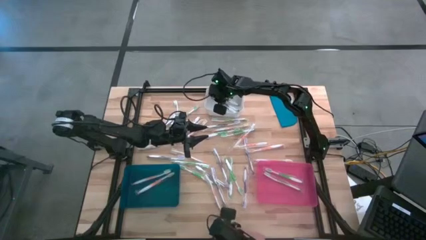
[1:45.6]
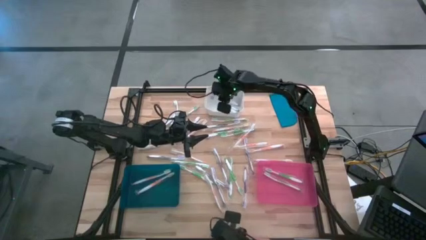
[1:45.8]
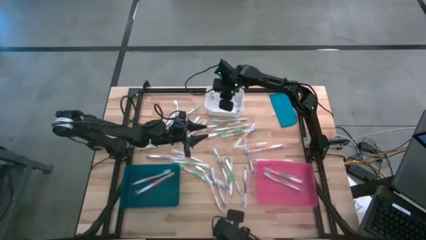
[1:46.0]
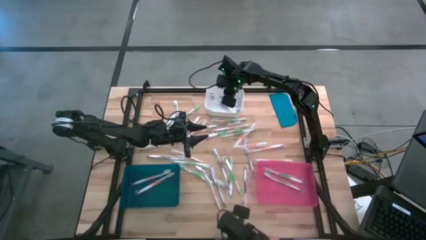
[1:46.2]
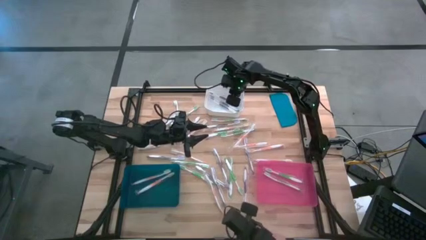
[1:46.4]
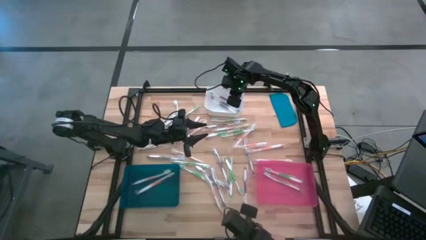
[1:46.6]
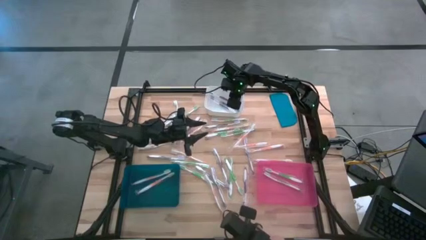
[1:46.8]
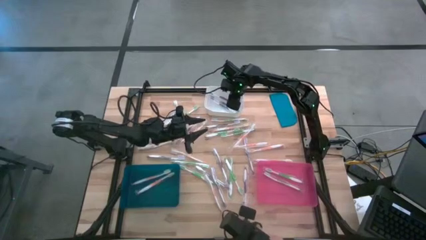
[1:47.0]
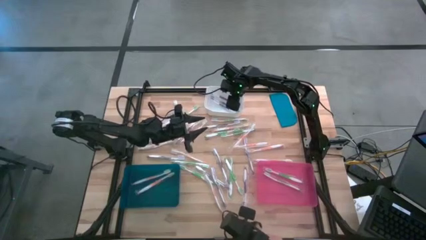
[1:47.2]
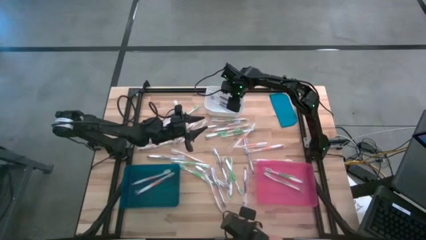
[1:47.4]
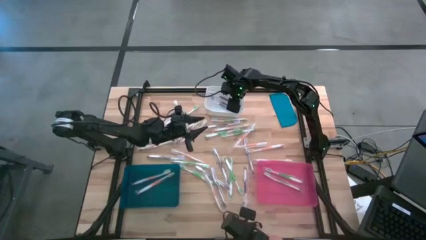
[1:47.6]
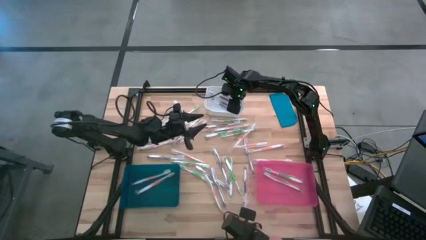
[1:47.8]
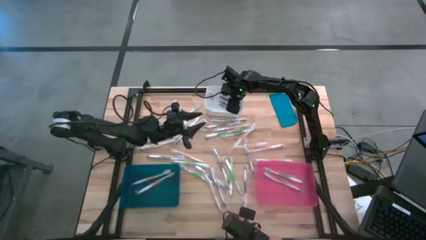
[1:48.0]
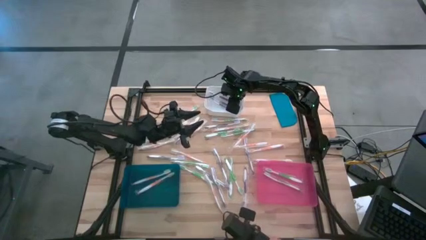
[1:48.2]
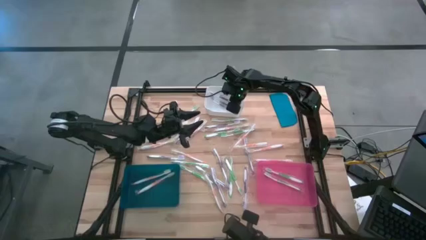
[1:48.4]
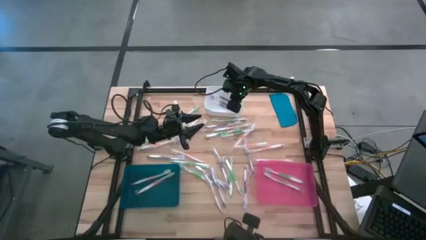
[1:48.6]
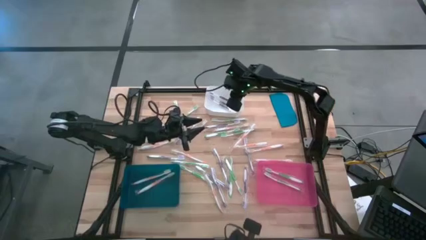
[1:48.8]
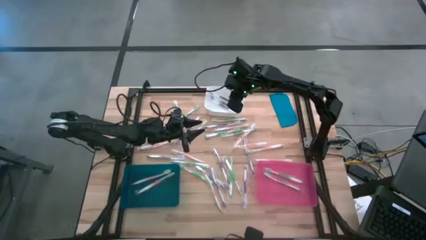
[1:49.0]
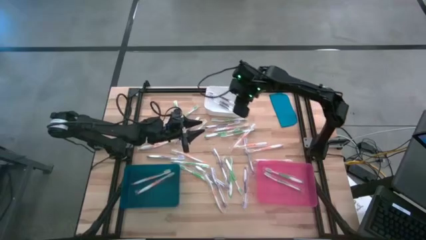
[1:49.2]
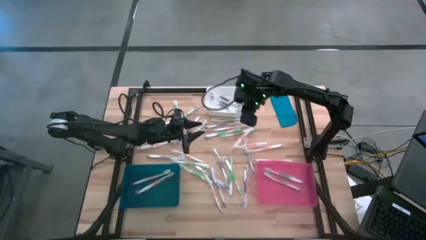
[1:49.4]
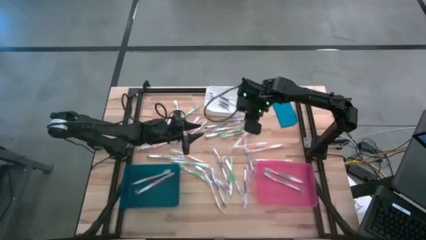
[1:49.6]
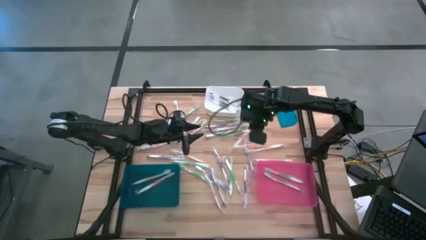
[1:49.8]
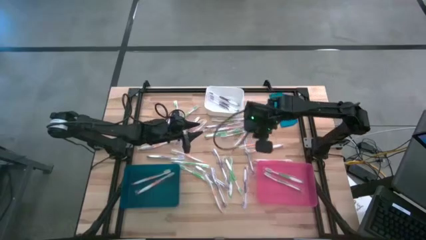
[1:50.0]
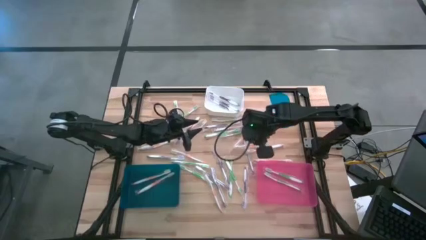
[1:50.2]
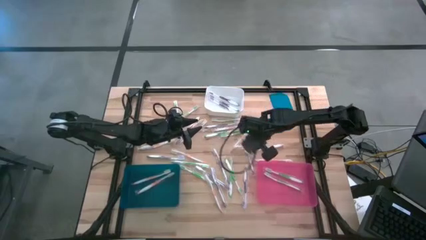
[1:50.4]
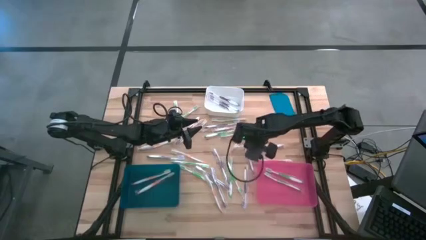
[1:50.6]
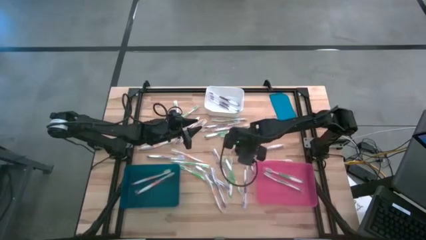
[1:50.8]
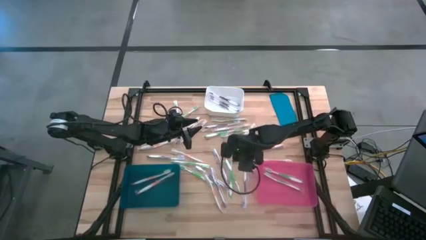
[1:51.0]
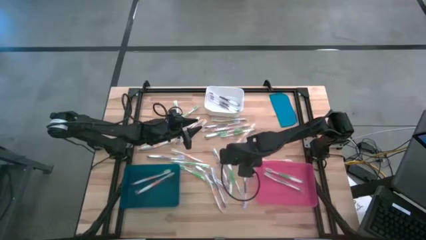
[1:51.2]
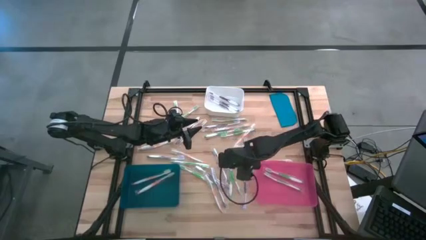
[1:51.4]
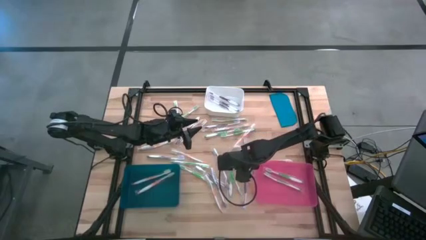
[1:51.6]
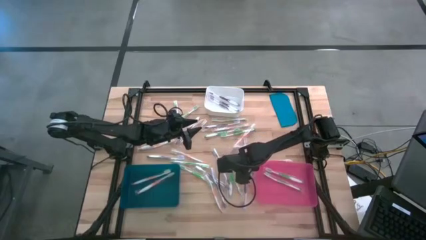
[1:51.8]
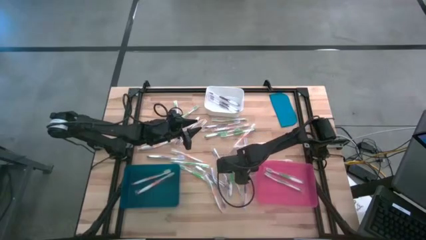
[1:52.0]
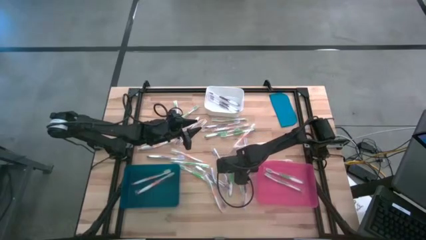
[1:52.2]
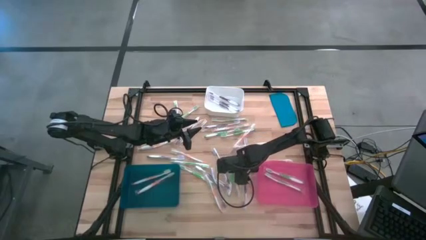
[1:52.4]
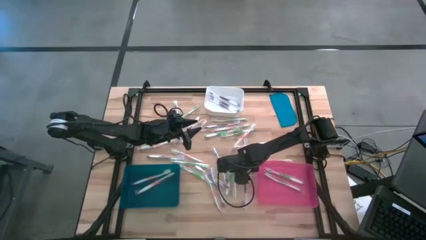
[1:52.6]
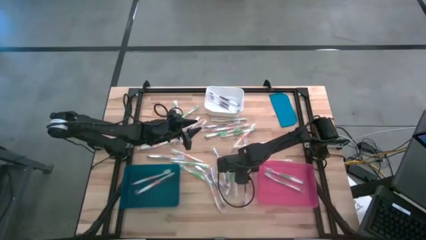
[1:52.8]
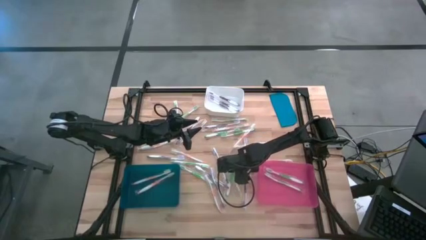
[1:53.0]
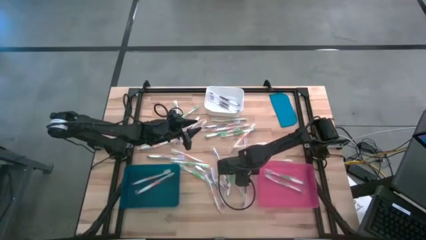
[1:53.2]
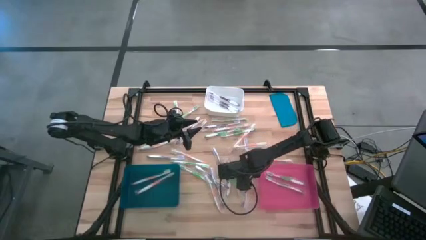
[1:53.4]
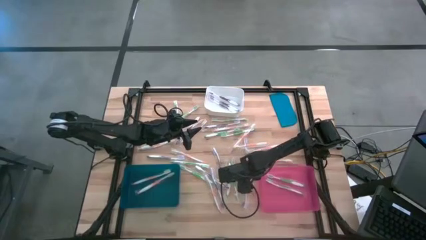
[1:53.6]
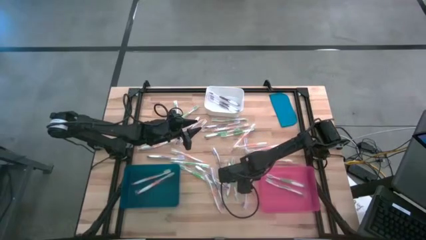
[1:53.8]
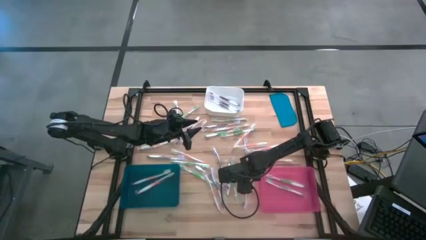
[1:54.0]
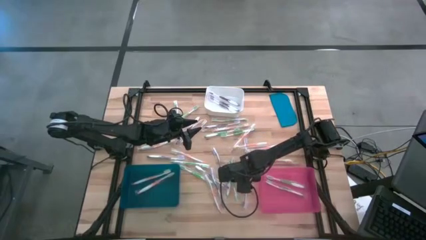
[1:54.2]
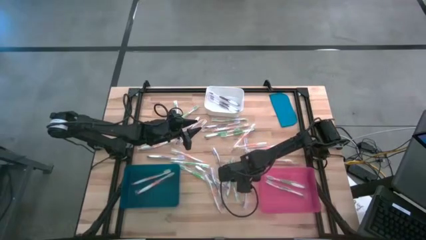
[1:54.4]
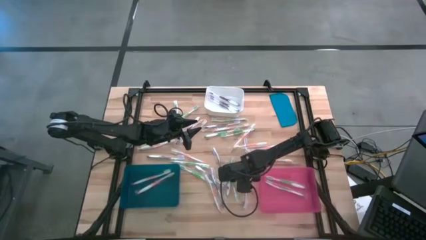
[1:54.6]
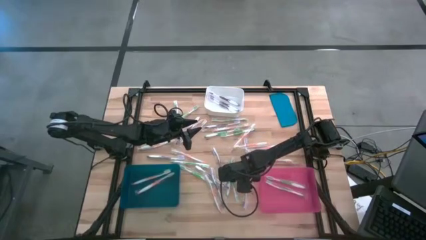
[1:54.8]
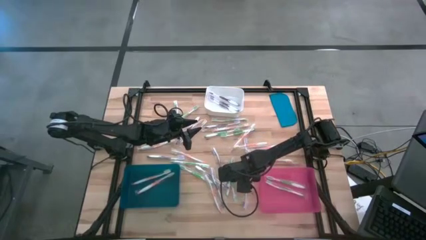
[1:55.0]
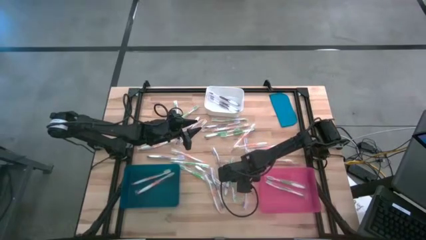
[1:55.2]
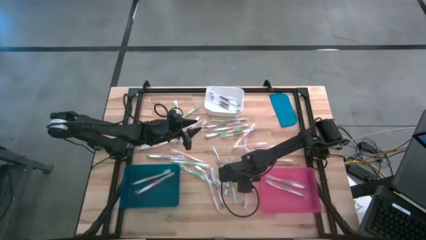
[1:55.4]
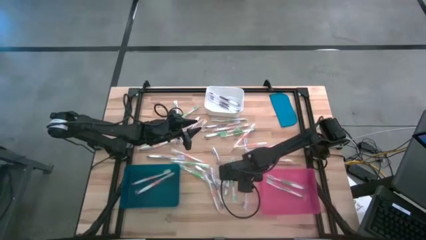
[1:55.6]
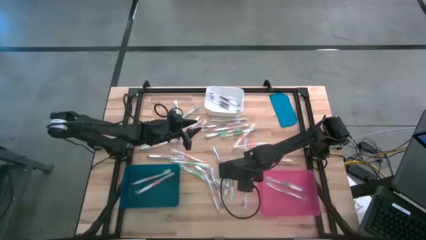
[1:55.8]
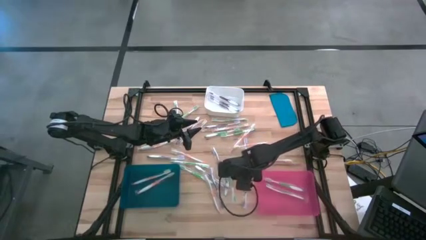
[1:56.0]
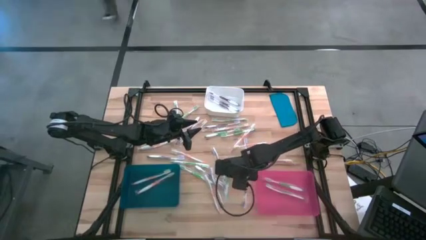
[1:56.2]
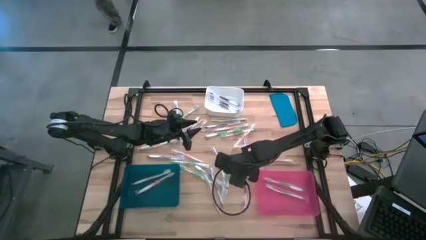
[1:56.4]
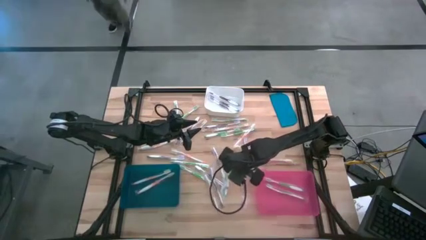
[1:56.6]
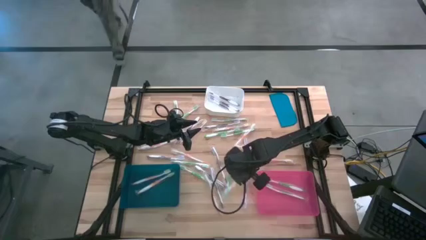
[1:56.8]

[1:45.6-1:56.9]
Task: Pick & Place Toothbrushes
Put the green toothbrush into the pink bin

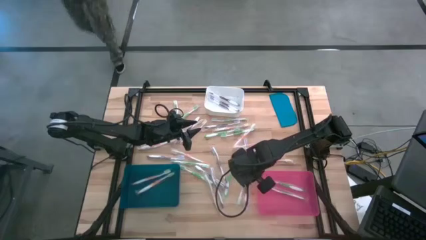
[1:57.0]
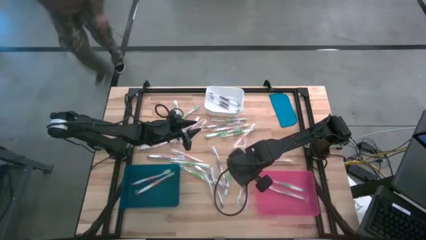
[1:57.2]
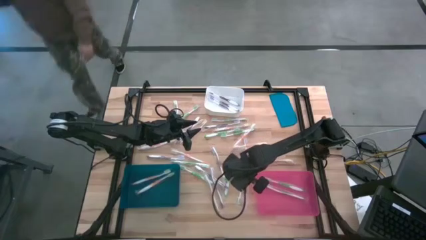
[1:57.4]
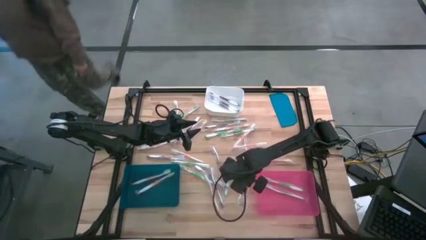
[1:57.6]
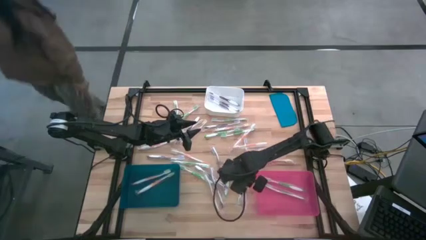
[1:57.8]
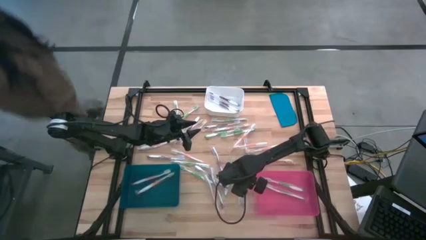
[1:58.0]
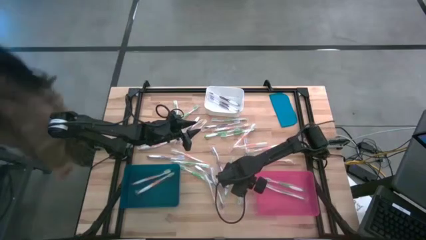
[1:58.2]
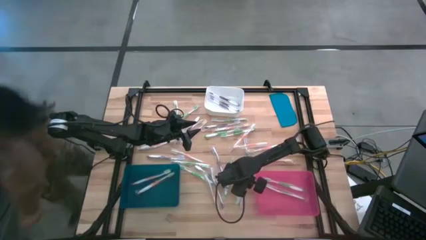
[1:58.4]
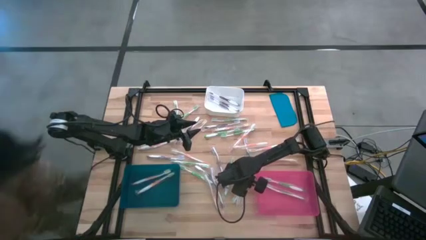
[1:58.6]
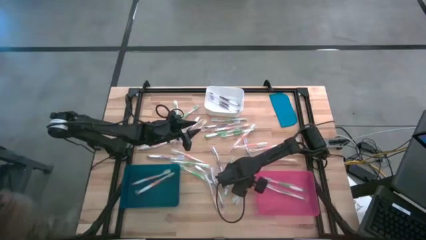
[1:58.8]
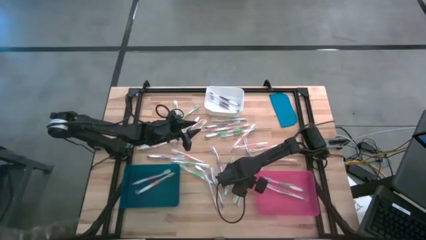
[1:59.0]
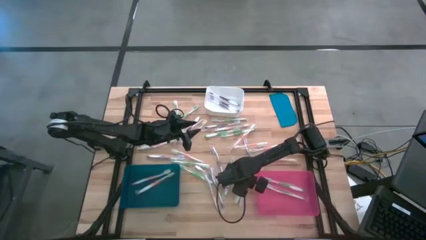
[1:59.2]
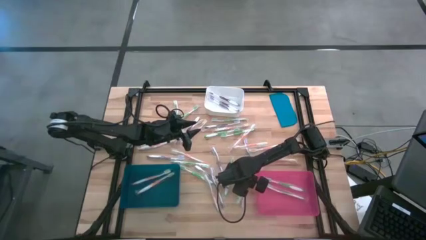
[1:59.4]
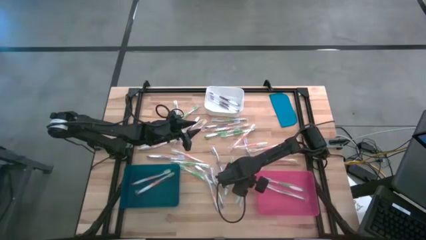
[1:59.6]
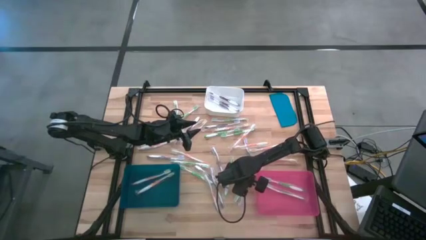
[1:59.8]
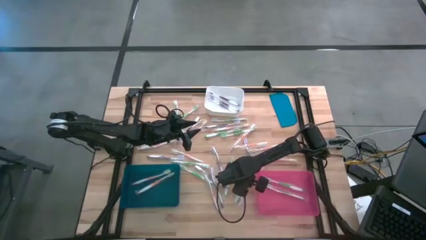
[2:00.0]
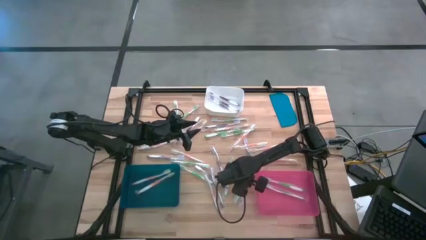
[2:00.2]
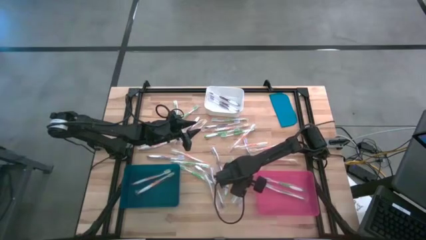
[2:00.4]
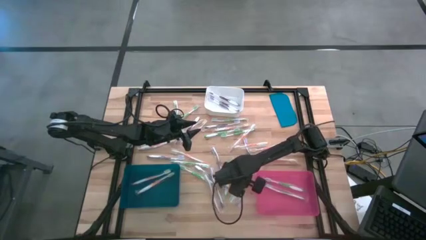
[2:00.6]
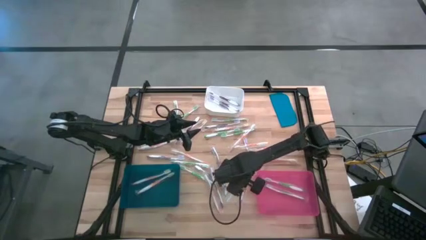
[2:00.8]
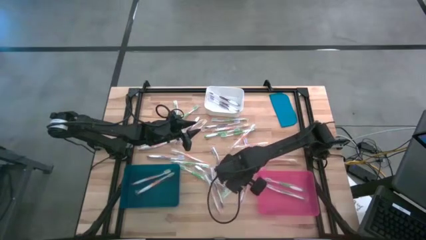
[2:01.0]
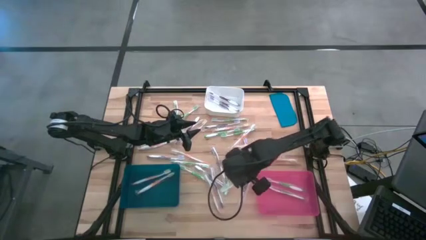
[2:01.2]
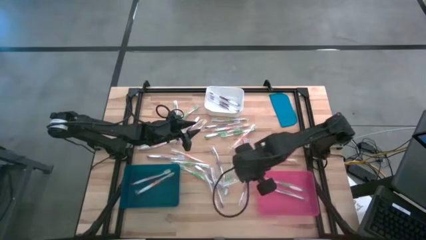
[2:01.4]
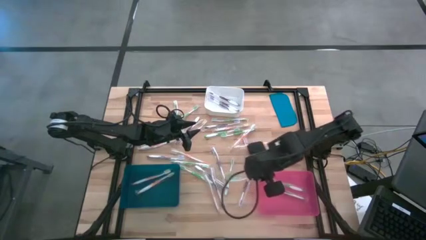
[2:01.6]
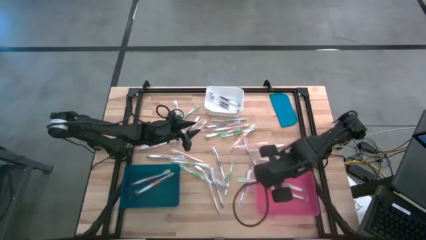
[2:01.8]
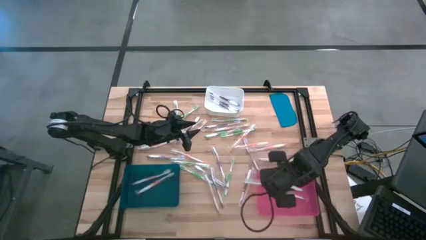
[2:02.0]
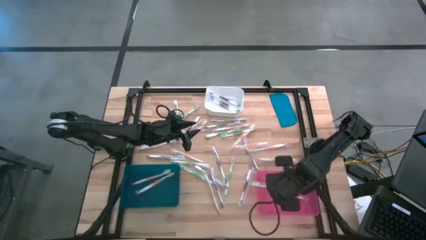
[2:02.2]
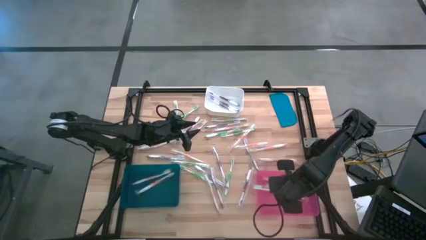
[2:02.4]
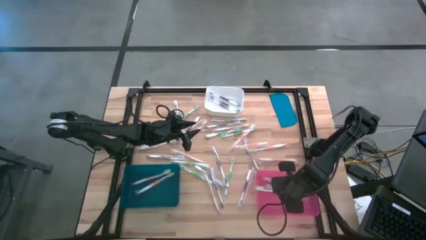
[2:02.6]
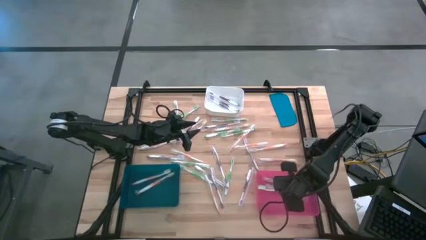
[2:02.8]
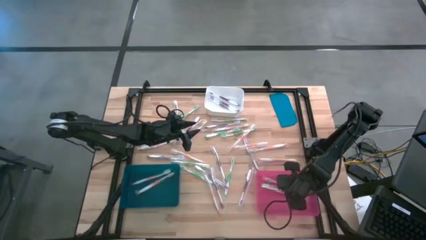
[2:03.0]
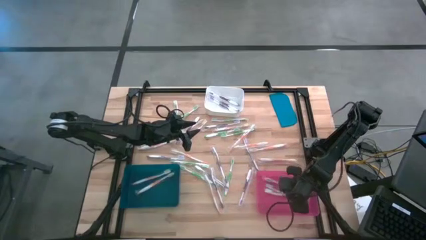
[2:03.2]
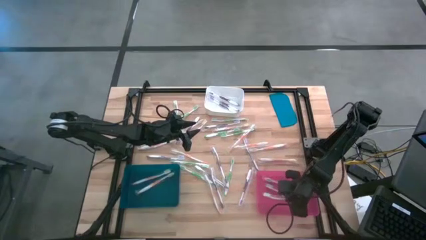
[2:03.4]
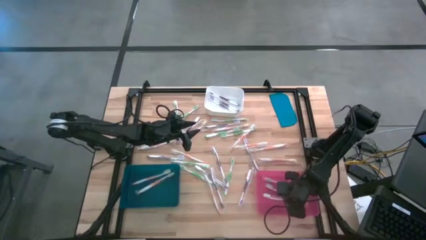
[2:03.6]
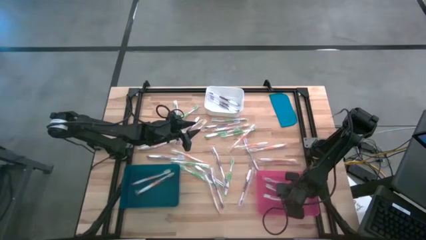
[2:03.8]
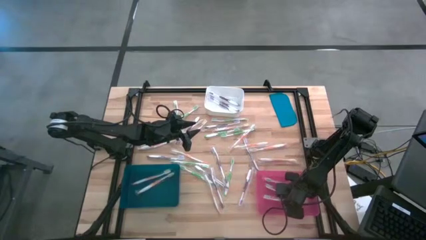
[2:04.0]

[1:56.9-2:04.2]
Put the green toothbrush into the pink bin
